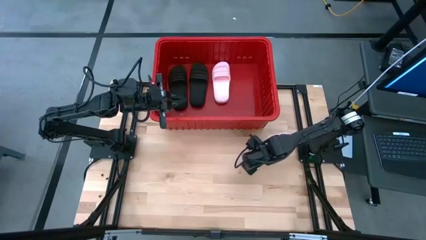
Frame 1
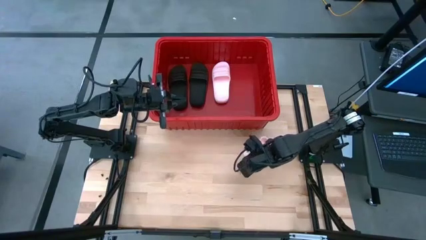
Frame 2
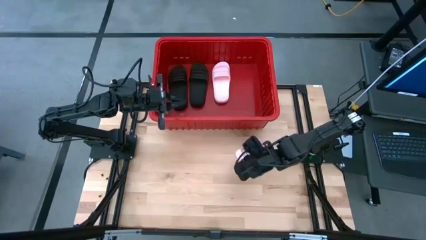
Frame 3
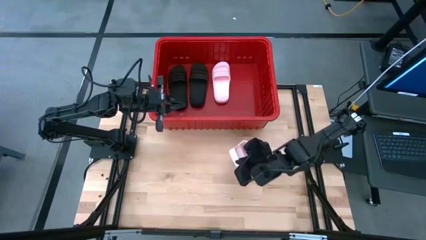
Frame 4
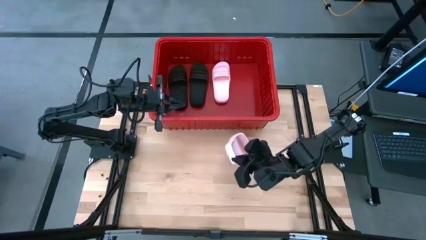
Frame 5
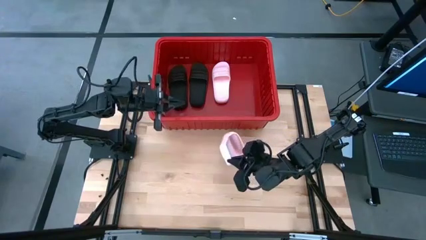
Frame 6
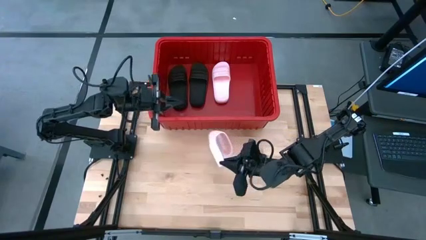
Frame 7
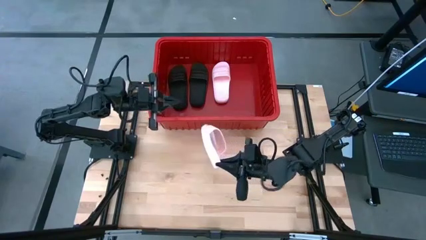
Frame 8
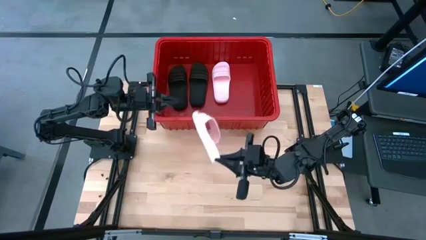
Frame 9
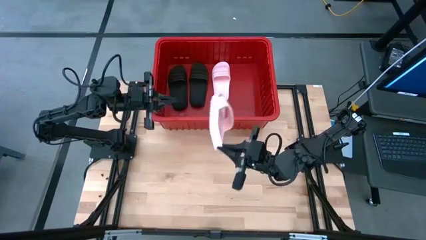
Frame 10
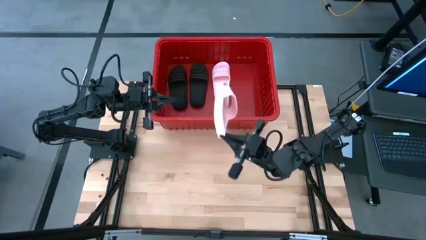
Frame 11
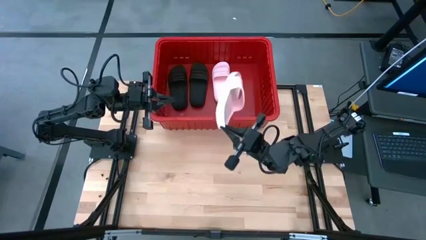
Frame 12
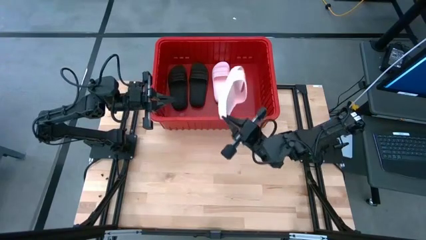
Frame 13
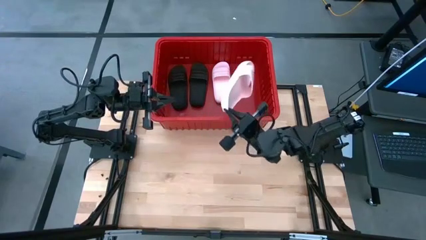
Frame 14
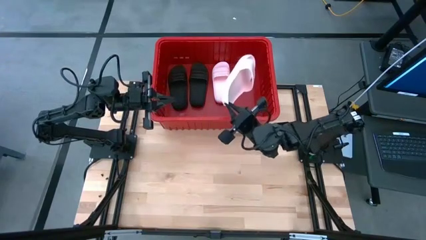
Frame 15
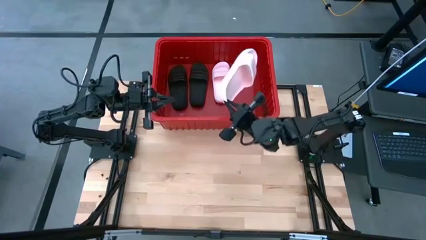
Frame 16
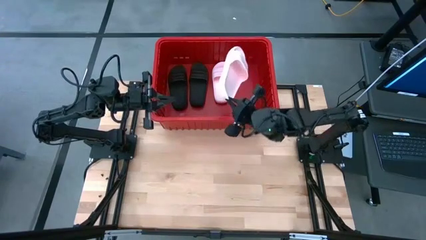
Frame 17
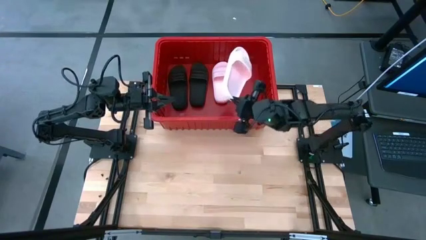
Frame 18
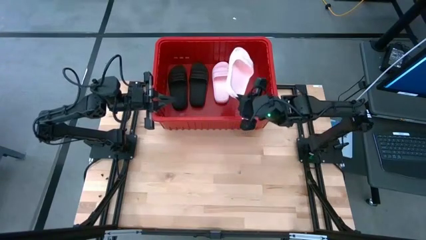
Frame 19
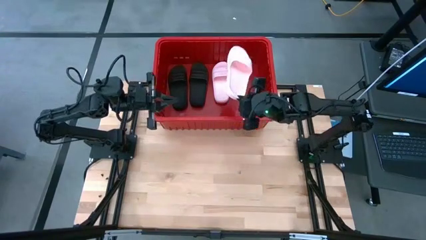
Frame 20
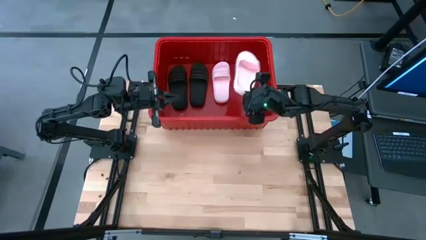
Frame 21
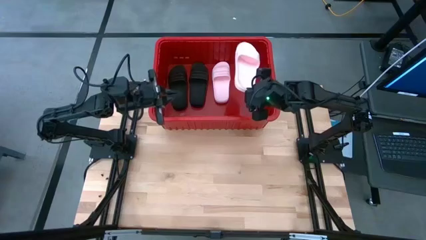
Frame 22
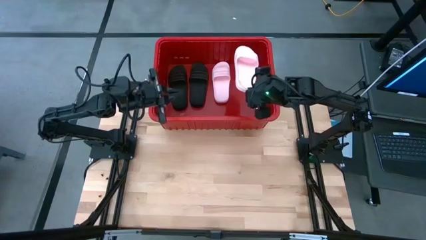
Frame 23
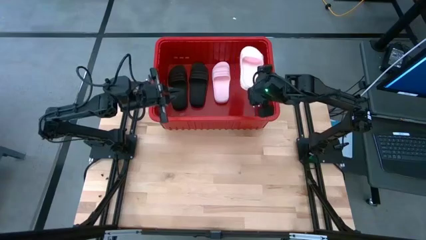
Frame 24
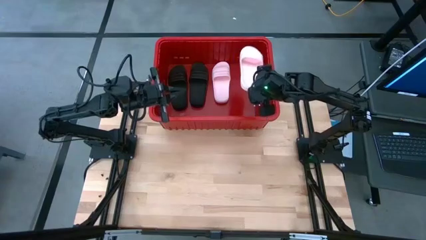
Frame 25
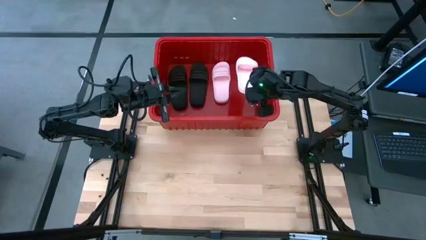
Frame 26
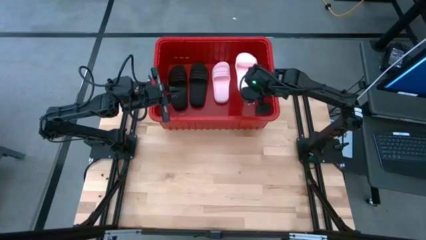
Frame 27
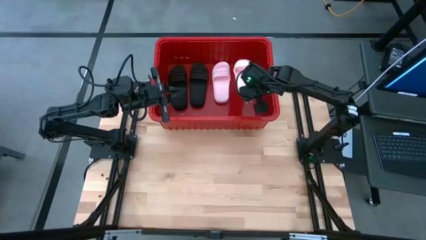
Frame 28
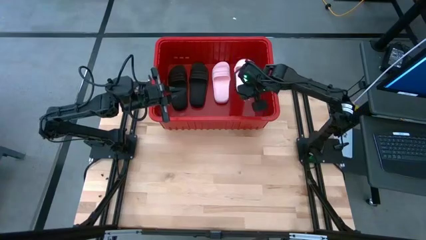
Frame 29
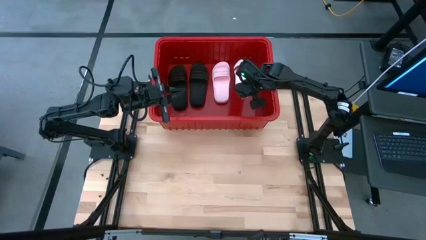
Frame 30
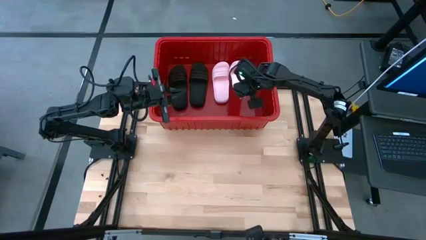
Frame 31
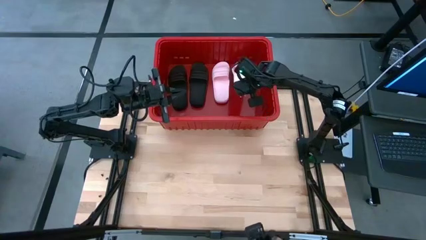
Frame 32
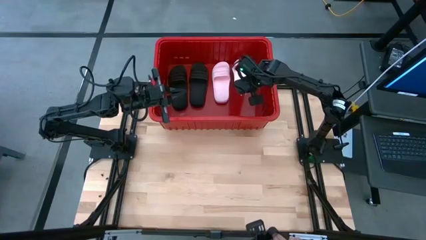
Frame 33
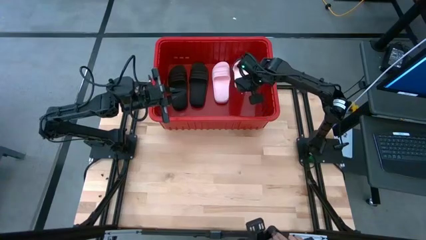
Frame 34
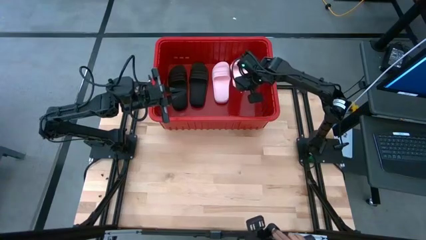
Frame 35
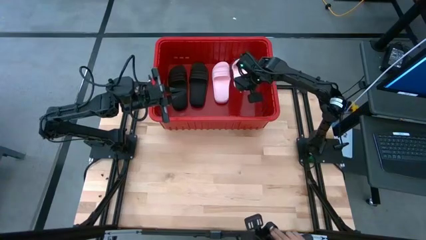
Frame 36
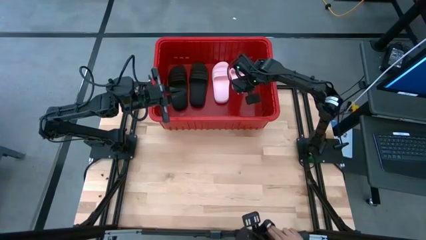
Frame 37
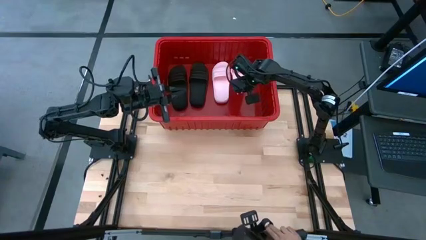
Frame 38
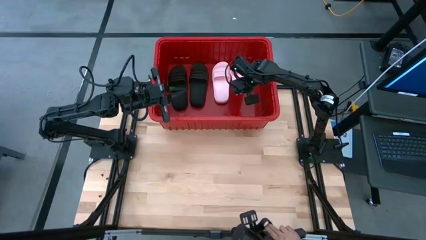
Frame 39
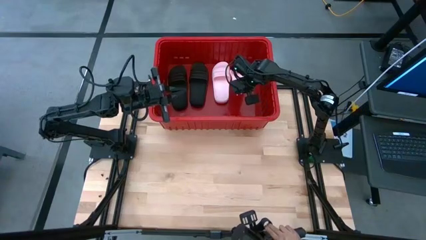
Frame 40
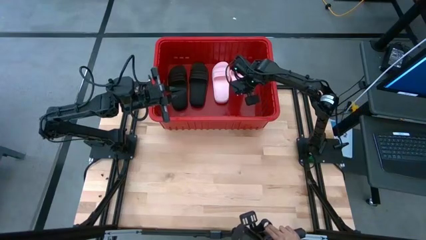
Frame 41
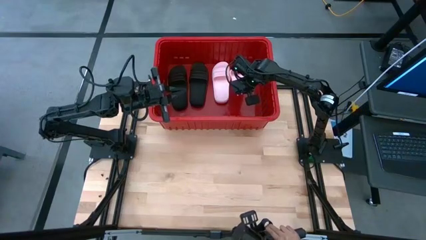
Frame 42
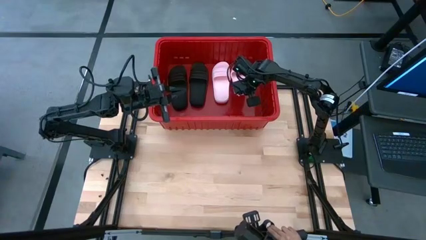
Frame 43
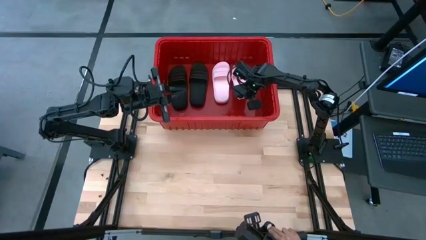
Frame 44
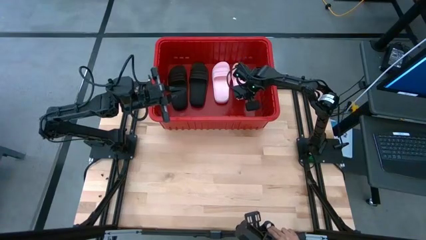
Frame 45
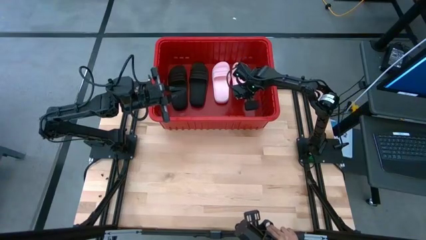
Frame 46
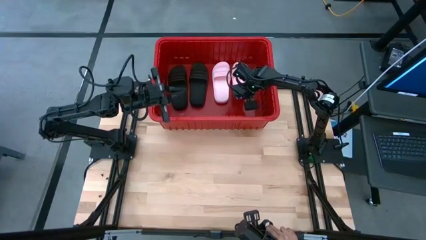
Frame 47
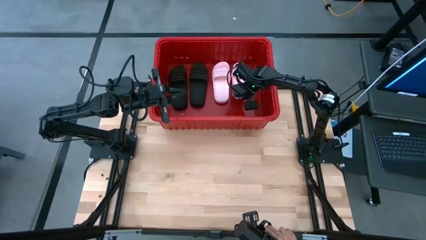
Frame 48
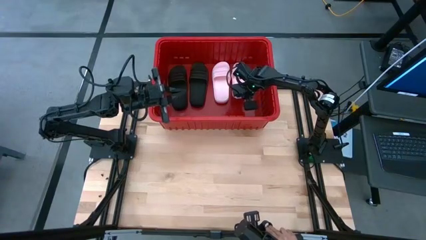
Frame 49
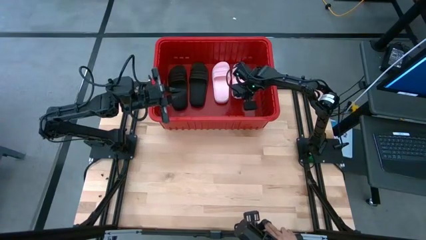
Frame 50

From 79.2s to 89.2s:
Task: Pick and place slides into bin
Put the pink slide into the red bin

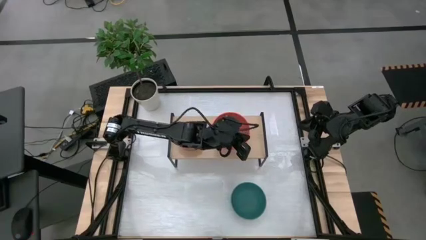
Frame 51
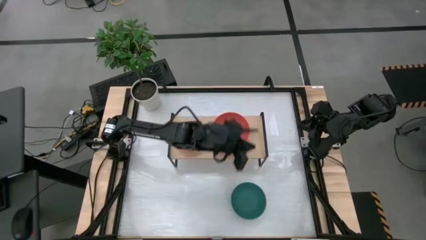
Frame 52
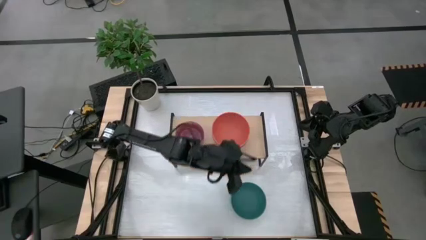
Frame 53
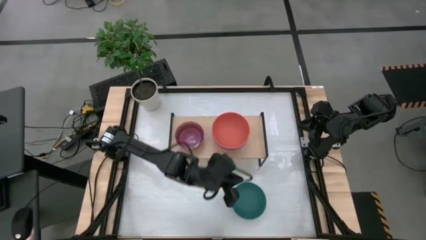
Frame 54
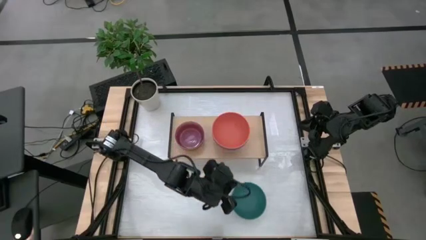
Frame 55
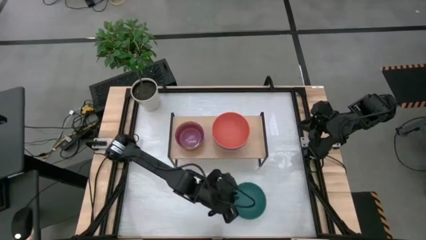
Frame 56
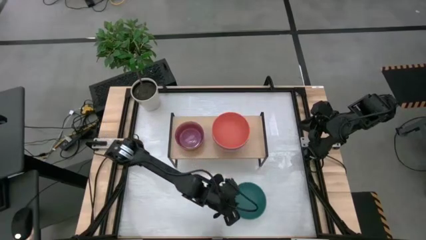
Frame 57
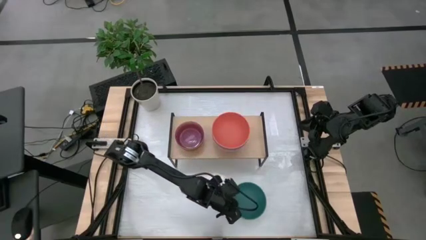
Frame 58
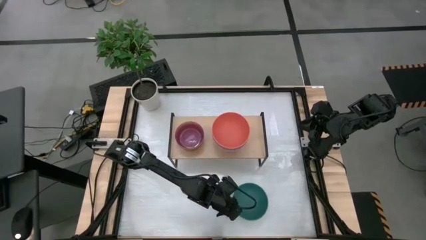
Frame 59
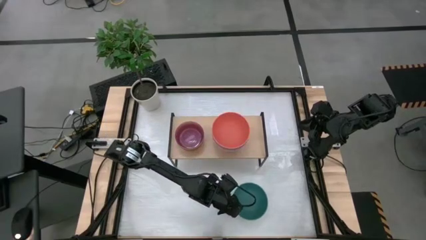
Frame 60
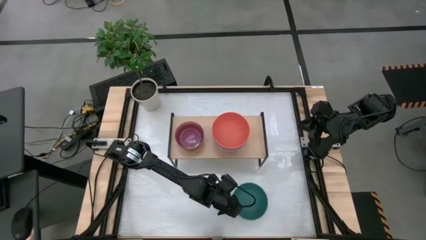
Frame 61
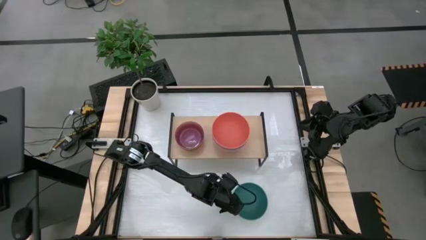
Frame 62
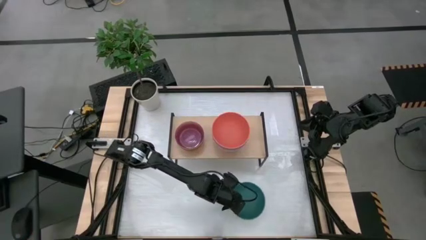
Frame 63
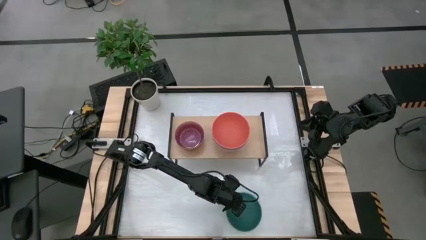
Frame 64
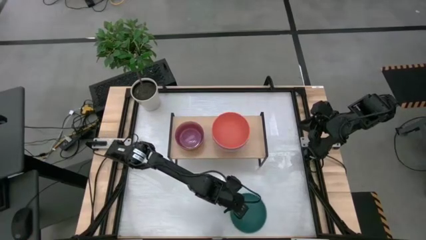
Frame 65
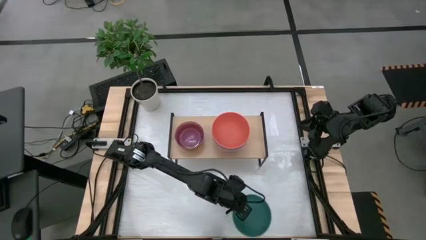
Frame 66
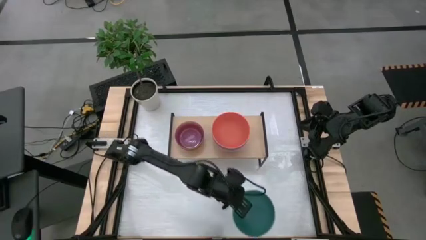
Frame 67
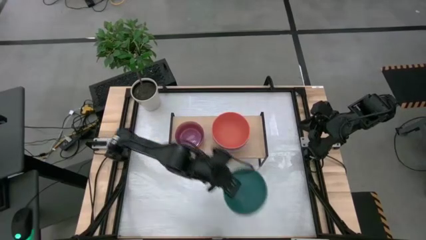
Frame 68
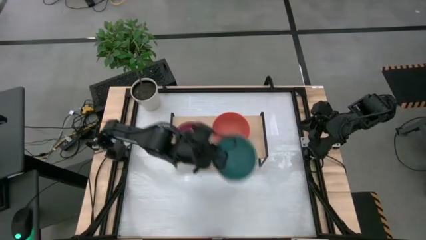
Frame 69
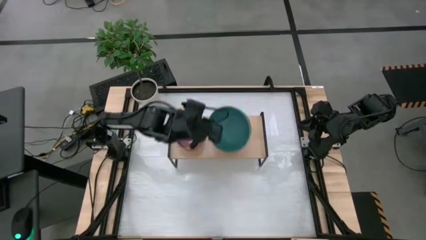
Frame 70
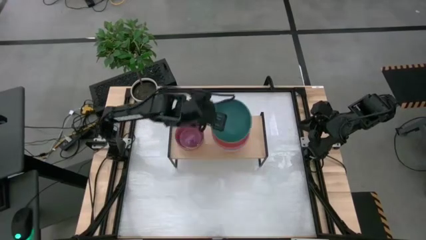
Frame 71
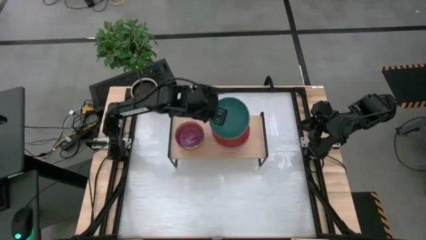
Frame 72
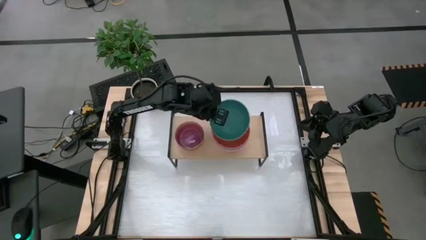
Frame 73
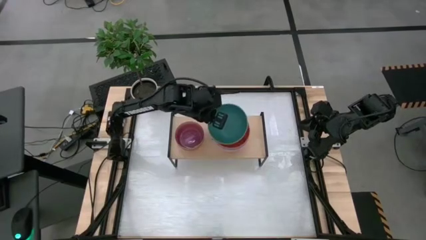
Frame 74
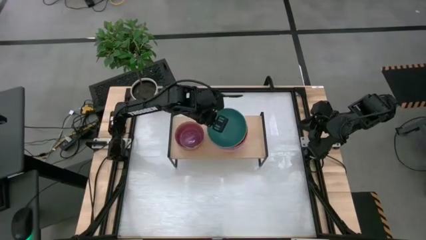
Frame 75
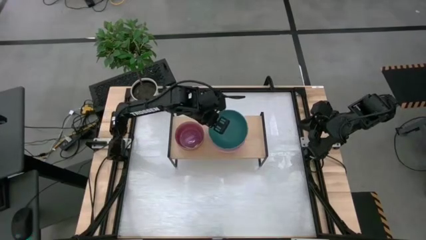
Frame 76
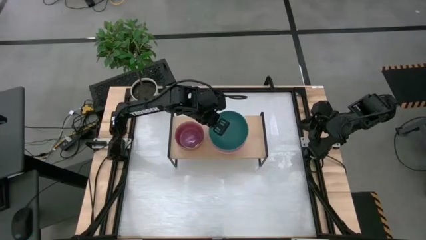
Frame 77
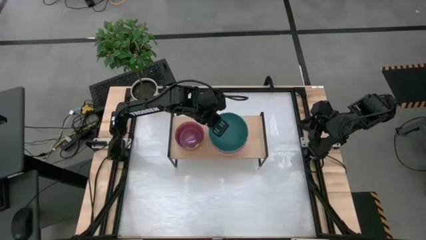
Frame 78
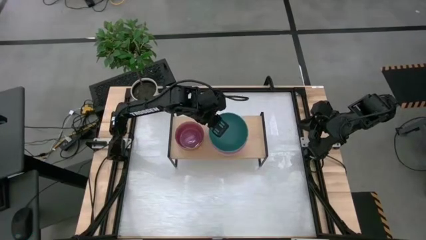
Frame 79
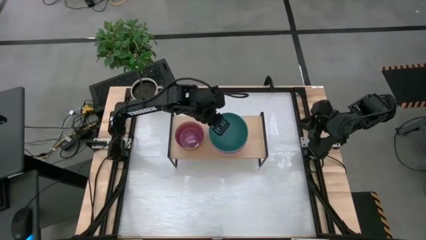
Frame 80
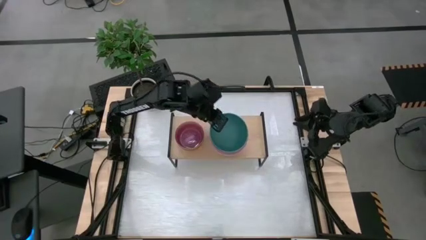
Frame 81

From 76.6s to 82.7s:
Task: Place and stack bowls onto a shelf
Stack the large green bowl on top of the orange bowl on the shelf
